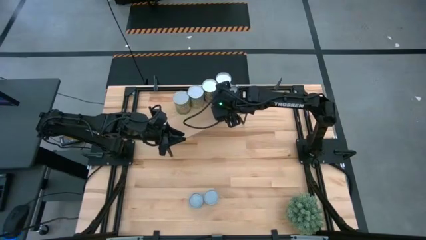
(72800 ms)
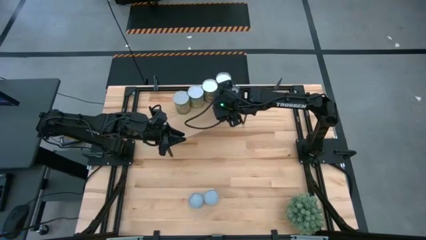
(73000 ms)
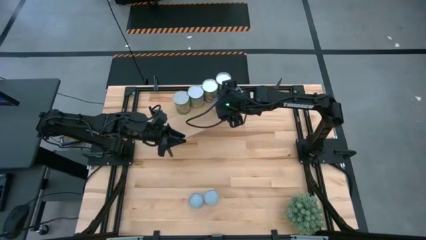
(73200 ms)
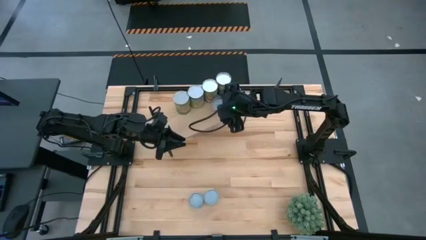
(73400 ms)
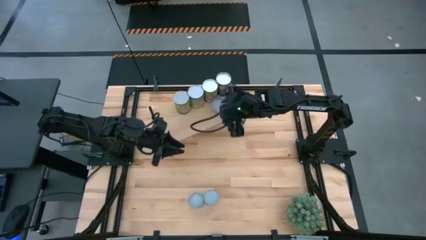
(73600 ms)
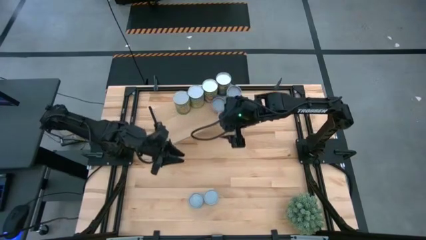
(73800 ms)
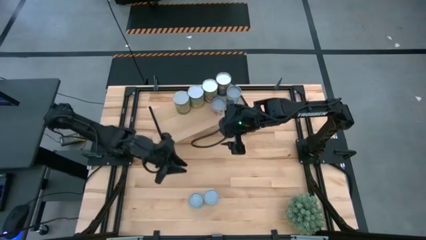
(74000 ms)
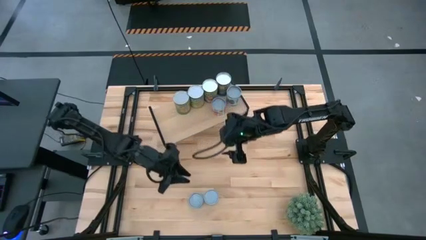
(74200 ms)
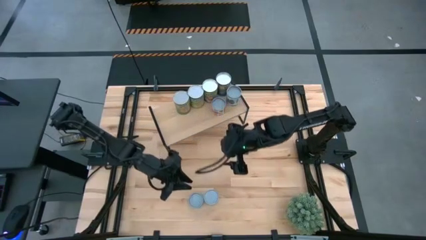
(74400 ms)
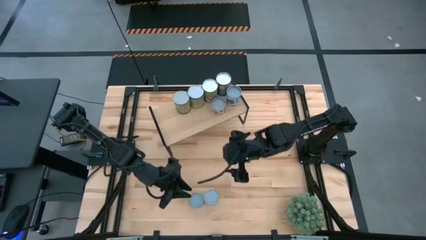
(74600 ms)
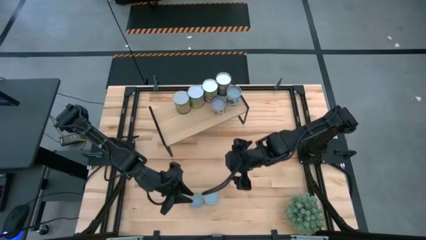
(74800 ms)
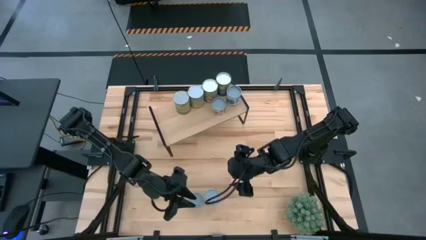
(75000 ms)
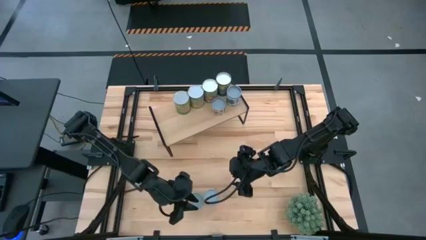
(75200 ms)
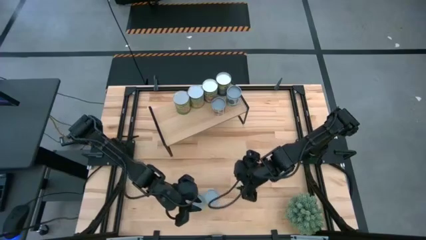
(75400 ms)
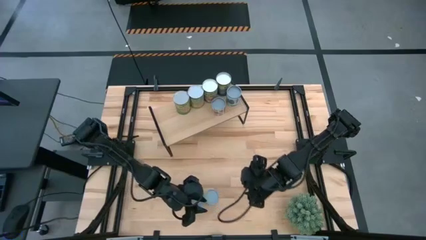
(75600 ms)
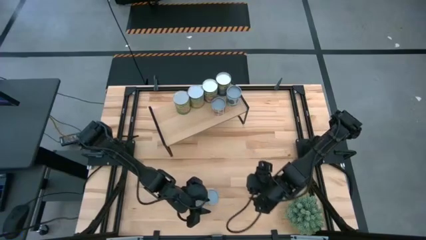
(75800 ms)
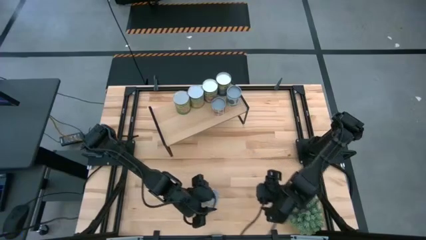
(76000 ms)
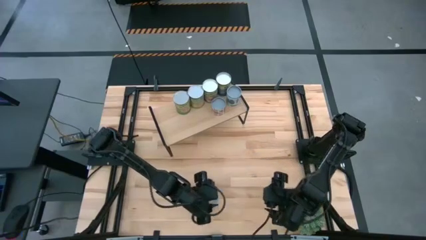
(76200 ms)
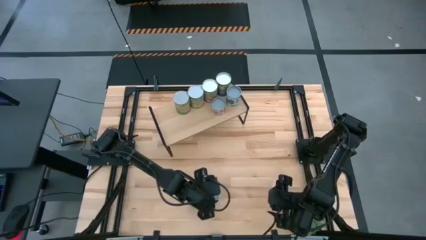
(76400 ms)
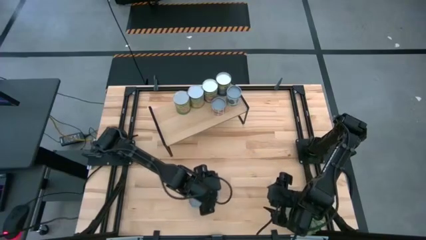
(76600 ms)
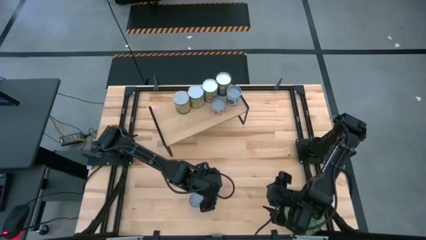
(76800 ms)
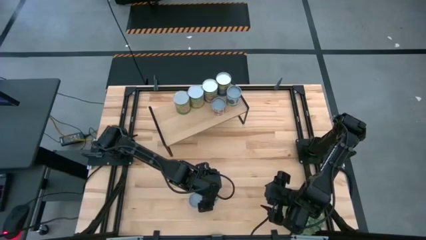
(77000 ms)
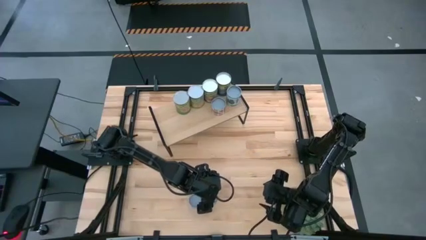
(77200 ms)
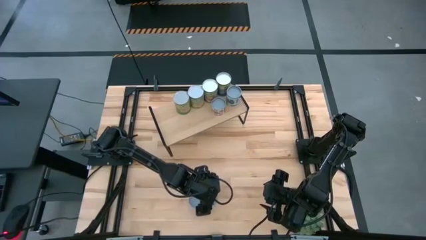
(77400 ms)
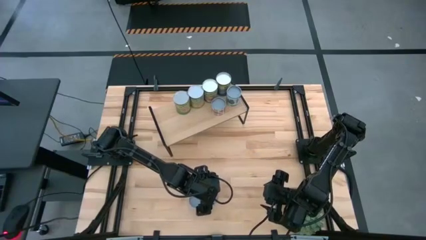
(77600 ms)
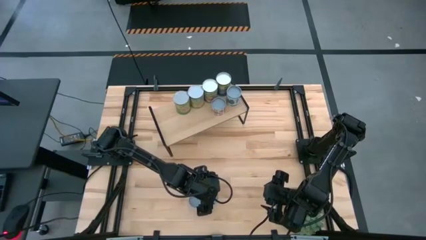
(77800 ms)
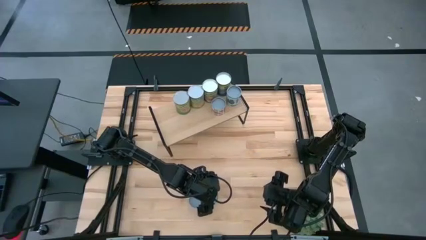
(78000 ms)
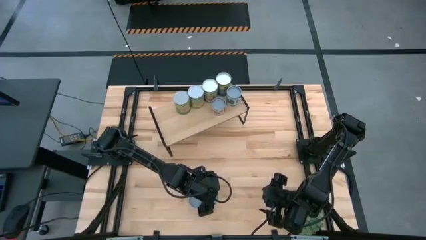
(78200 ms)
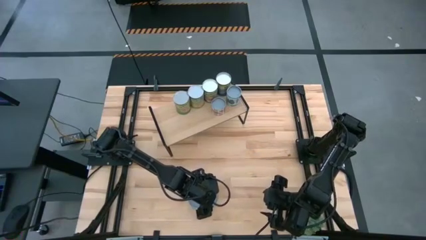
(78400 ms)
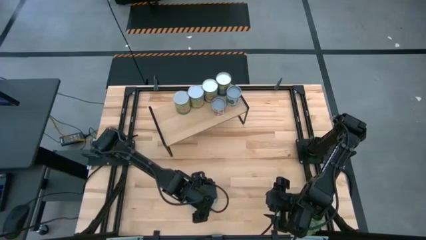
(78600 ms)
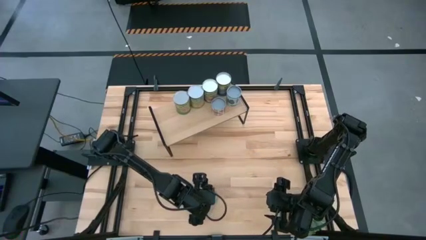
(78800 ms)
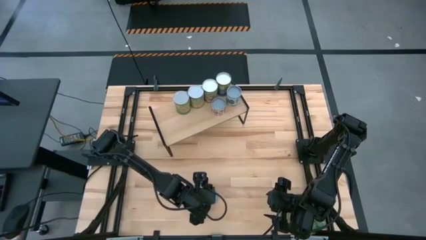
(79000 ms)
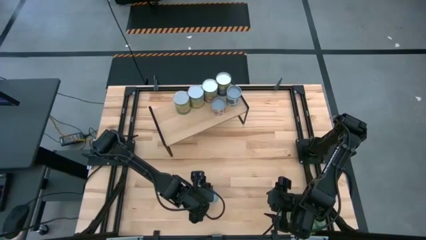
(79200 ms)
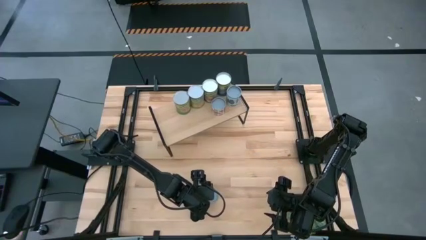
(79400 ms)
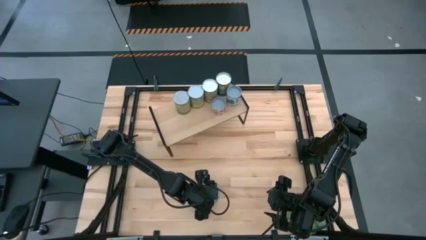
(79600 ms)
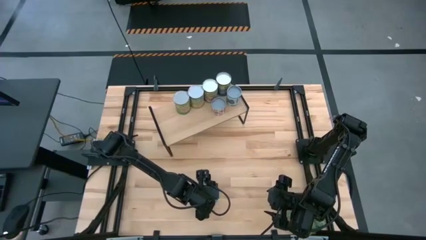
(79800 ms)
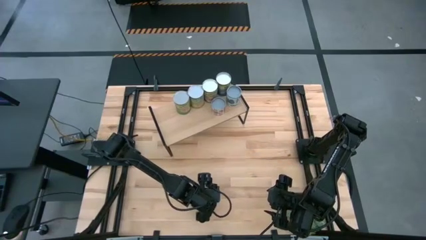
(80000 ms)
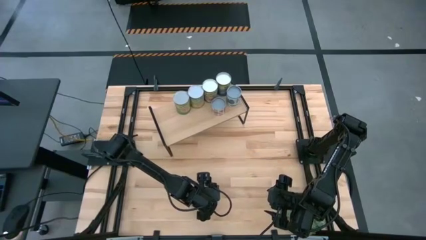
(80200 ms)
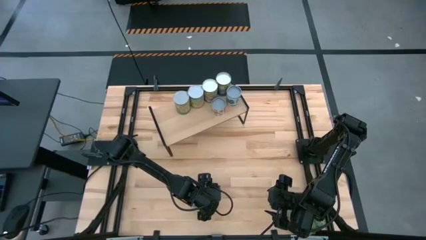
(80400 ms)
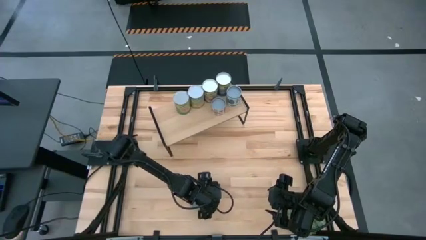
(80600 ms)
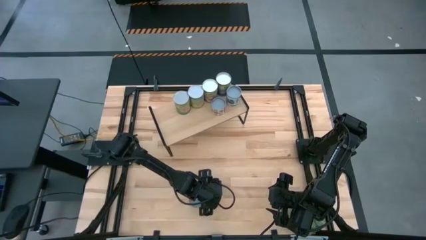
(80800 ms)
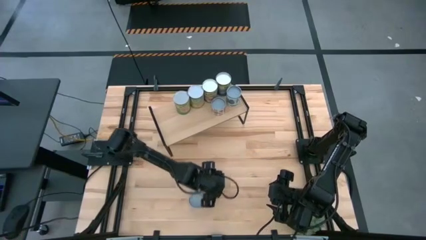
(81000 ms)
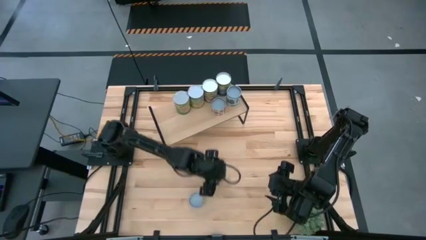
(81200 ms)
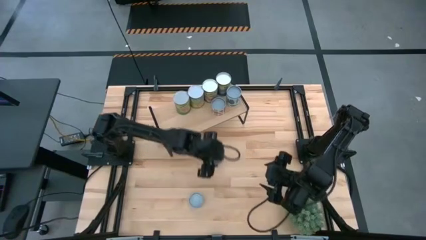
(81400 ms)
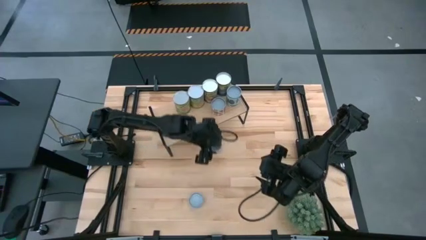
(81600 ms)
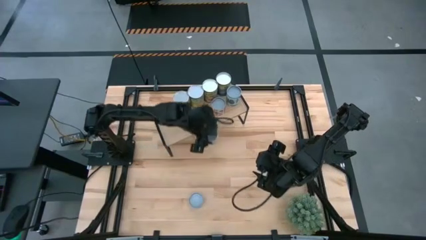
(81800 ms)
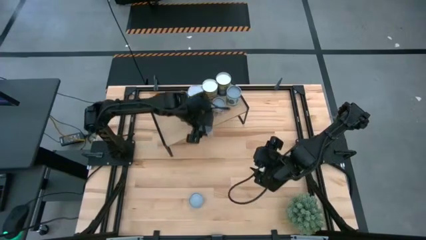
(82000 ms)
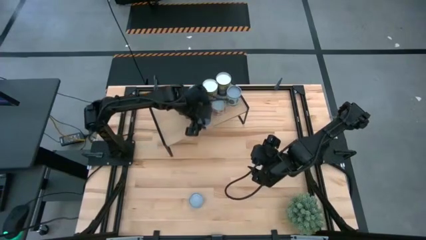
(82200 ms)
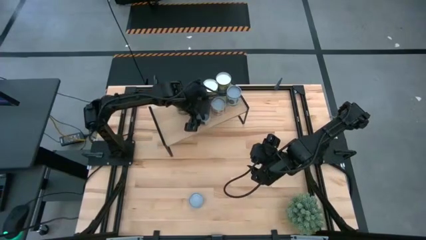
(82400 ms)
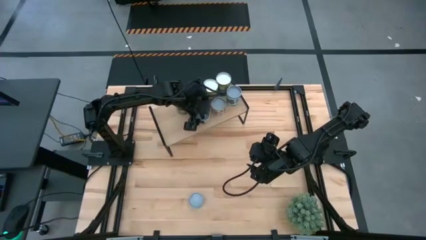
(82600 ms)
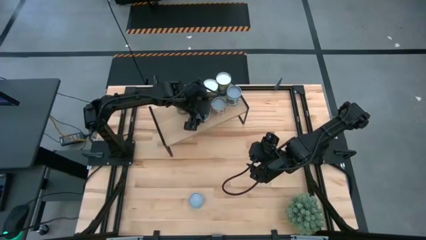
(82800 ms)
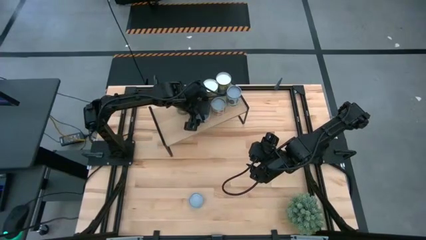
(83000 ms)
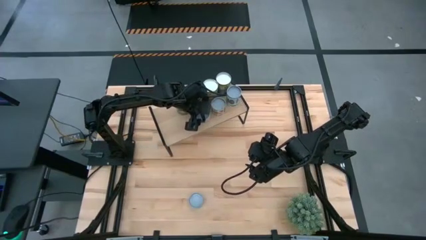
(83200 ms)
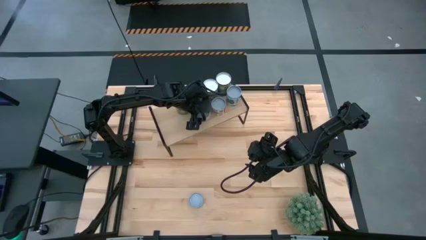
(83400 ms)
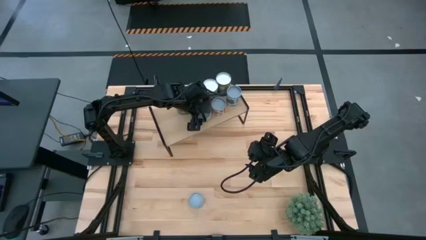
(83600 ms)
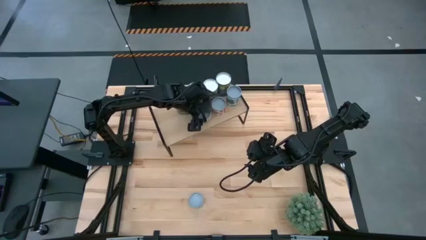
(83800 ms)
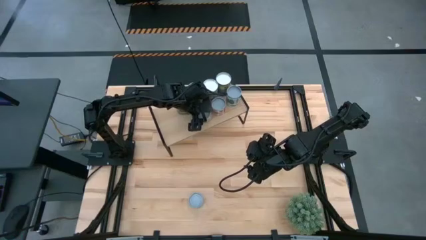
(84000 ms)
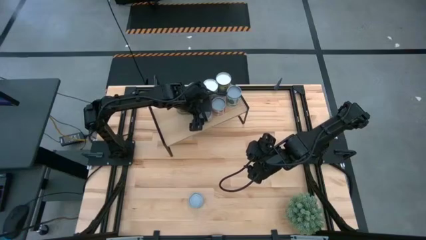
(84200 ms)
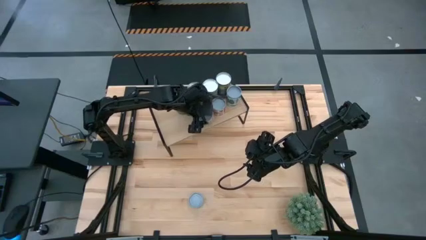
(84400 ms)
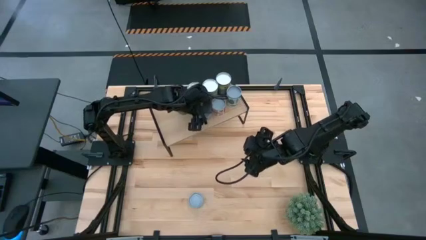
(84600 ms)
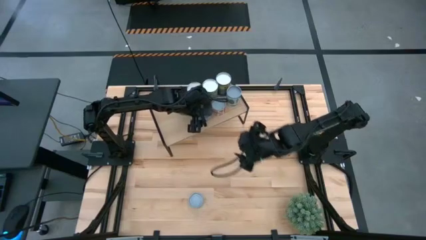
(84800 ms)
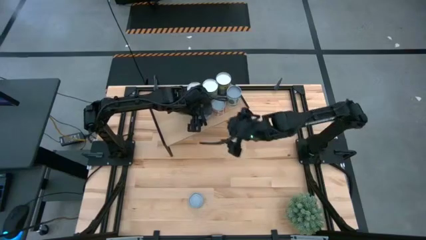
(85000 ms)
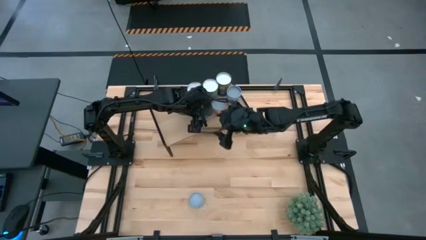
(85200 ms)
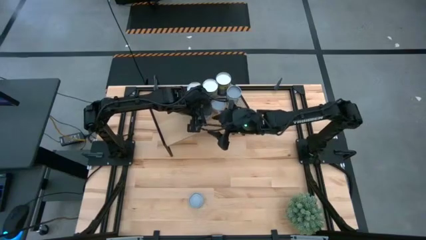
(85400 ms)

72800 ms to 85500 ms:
Task: Pick and place cans onto a shelf
Put the canned green peas on the shelf
